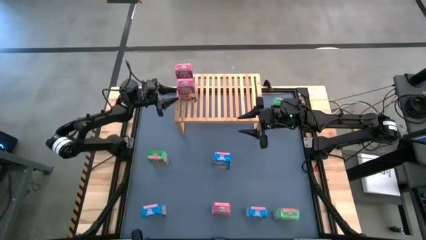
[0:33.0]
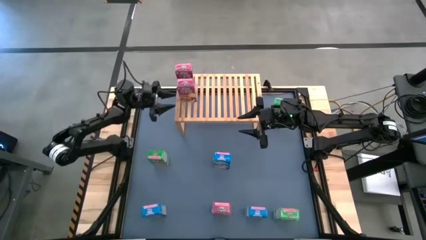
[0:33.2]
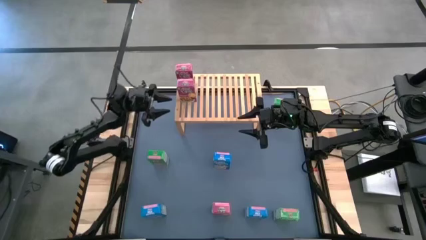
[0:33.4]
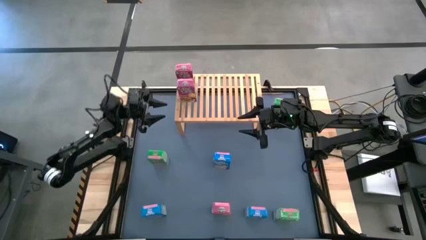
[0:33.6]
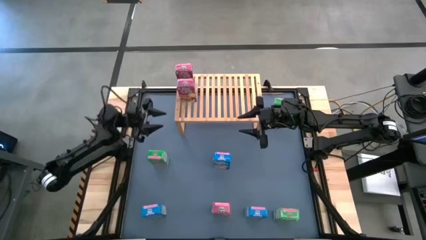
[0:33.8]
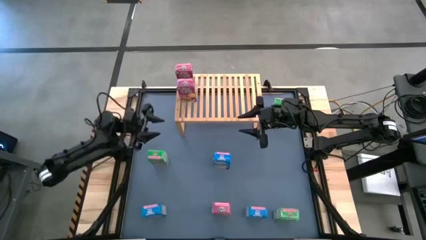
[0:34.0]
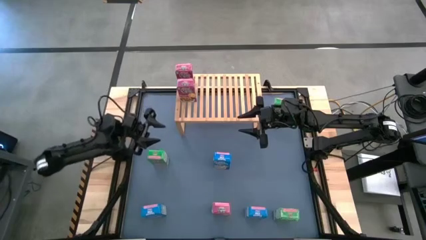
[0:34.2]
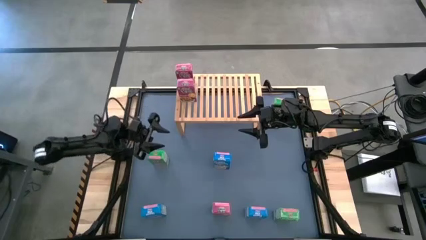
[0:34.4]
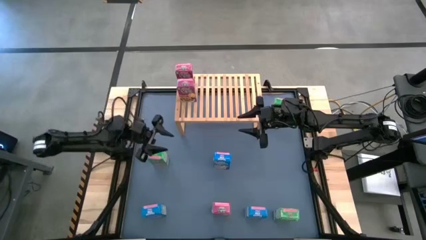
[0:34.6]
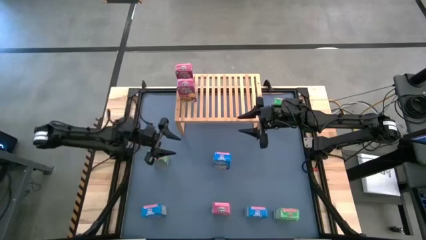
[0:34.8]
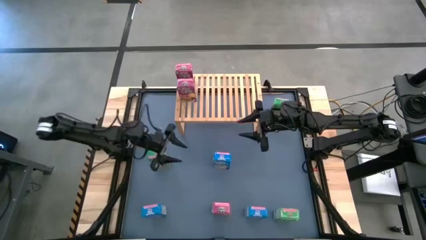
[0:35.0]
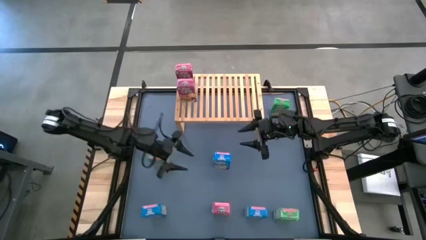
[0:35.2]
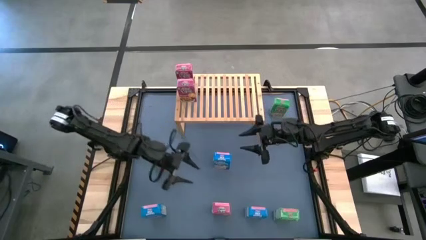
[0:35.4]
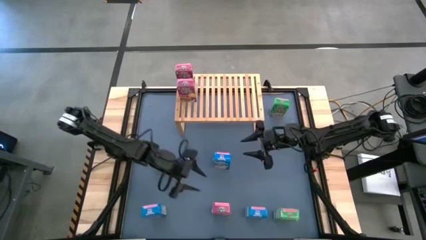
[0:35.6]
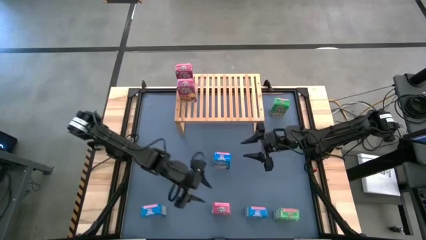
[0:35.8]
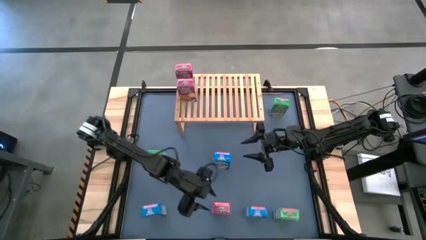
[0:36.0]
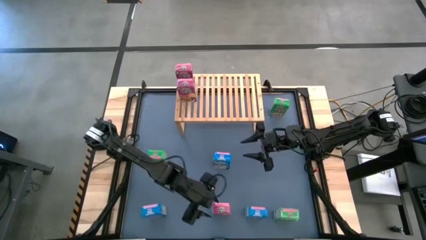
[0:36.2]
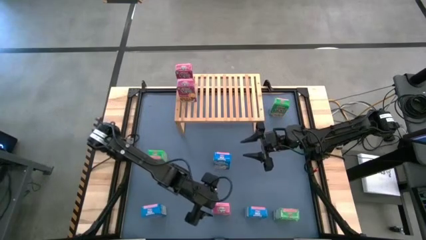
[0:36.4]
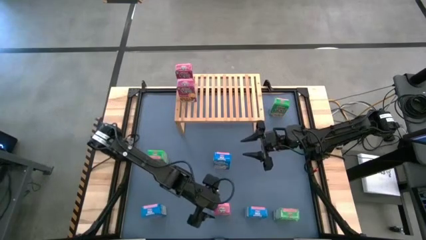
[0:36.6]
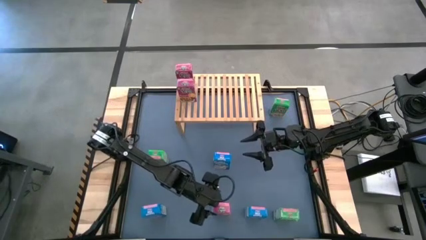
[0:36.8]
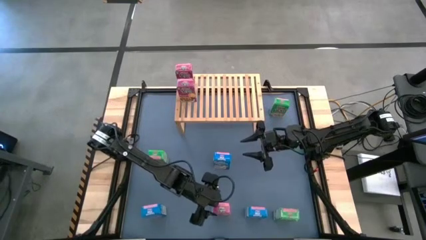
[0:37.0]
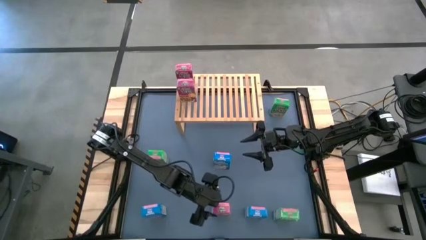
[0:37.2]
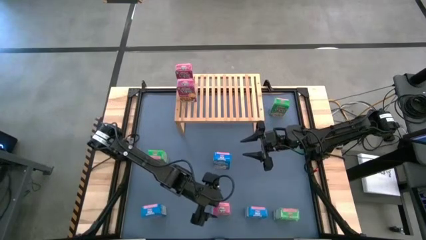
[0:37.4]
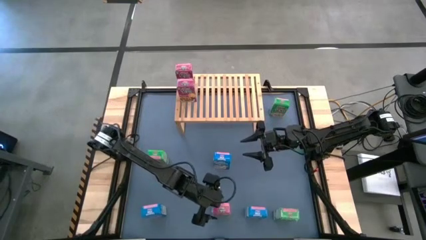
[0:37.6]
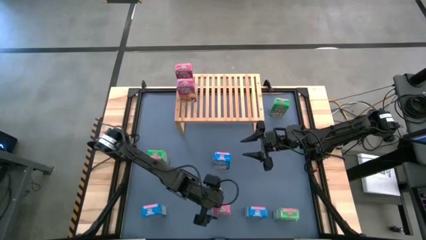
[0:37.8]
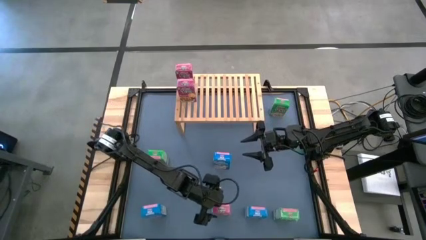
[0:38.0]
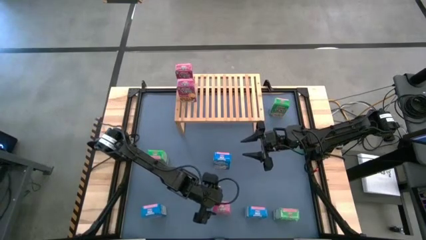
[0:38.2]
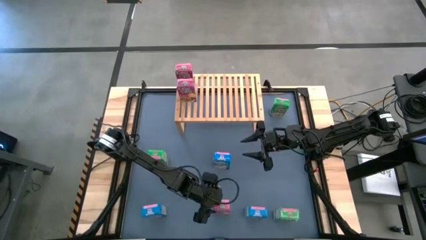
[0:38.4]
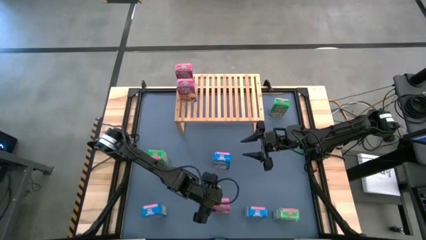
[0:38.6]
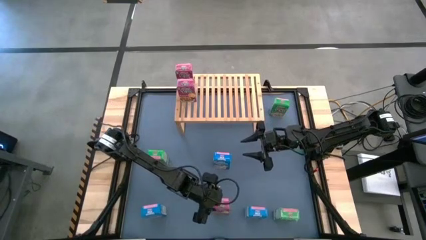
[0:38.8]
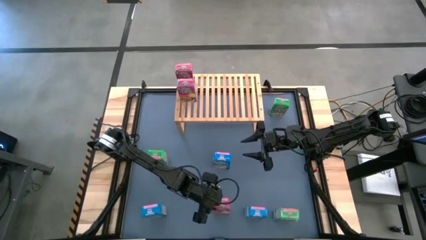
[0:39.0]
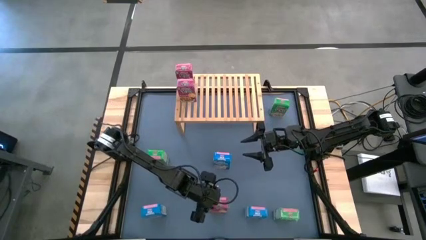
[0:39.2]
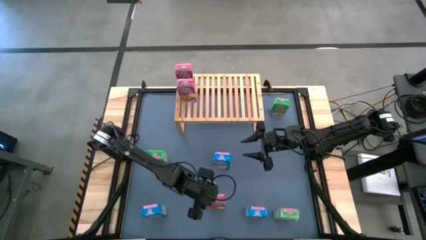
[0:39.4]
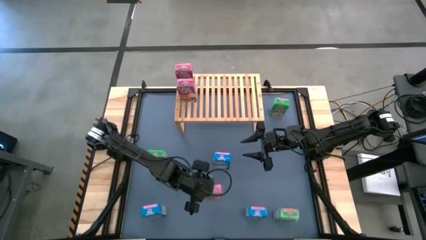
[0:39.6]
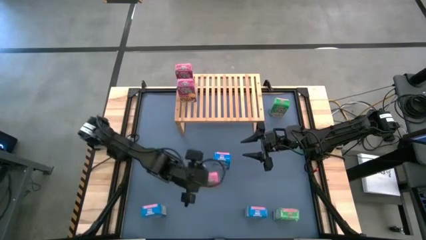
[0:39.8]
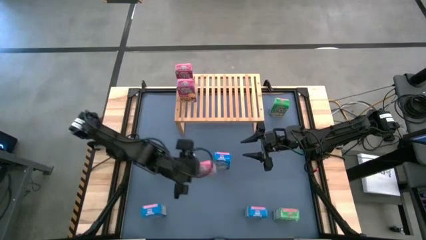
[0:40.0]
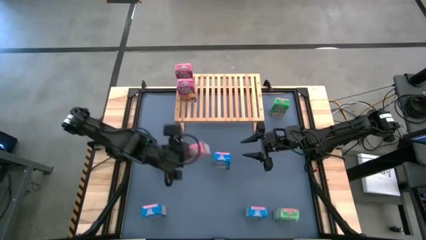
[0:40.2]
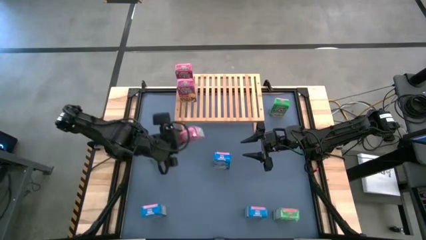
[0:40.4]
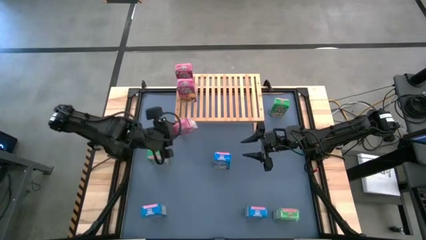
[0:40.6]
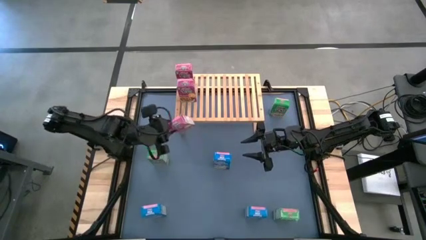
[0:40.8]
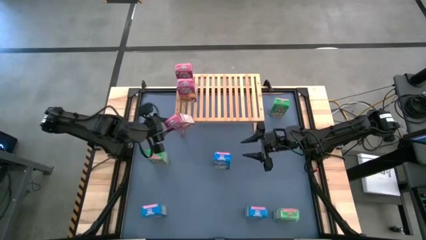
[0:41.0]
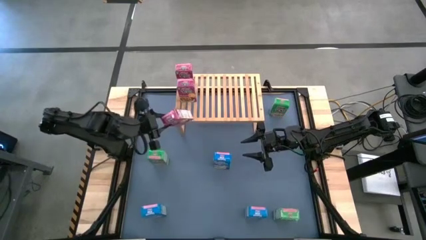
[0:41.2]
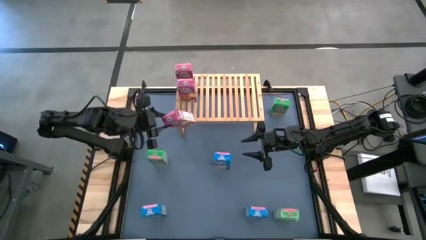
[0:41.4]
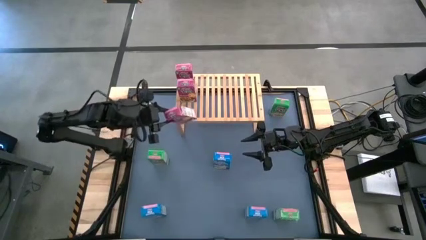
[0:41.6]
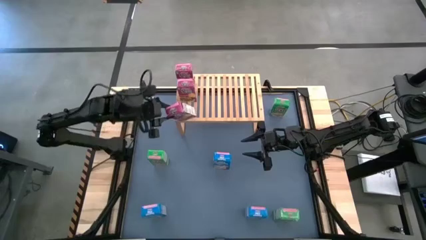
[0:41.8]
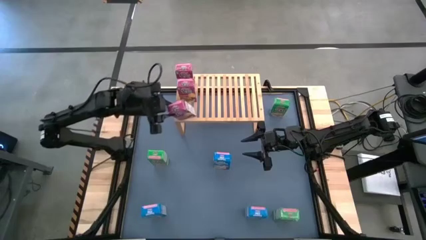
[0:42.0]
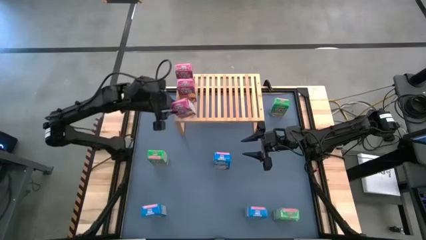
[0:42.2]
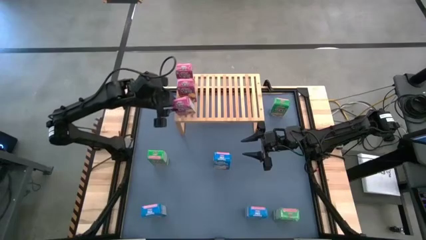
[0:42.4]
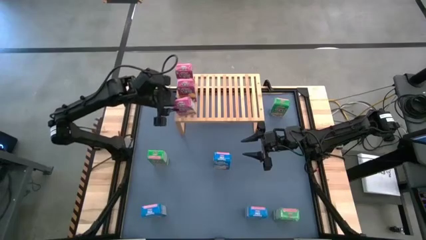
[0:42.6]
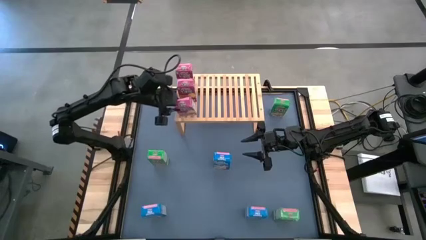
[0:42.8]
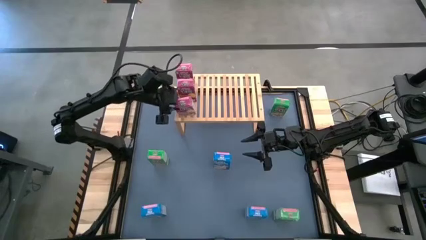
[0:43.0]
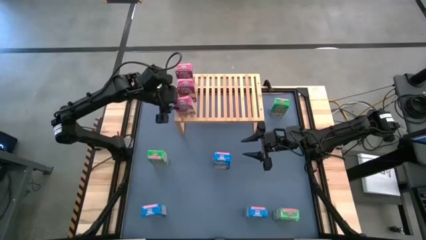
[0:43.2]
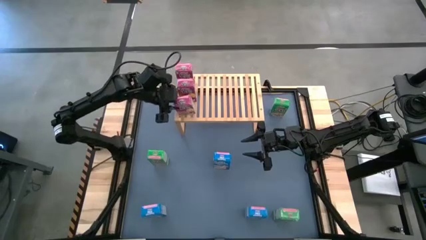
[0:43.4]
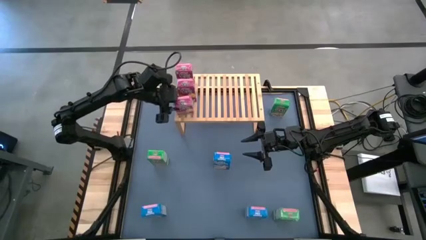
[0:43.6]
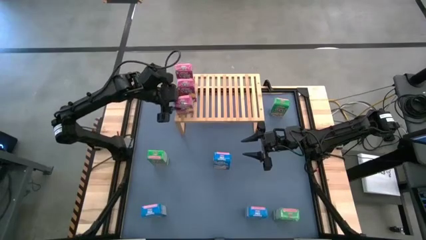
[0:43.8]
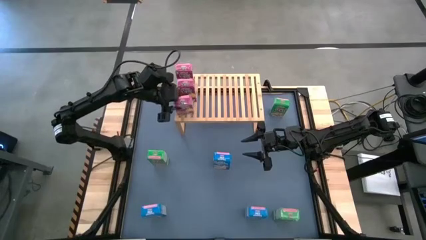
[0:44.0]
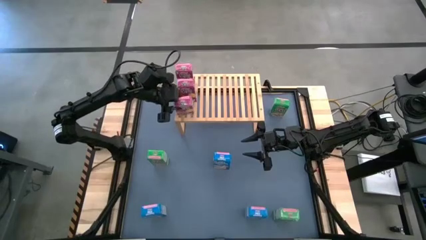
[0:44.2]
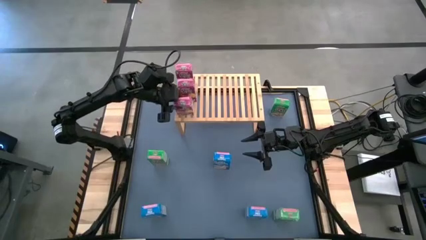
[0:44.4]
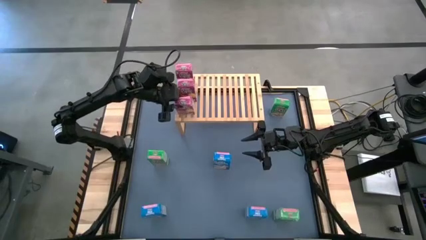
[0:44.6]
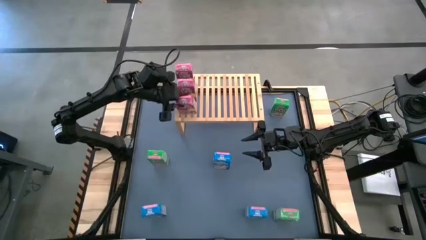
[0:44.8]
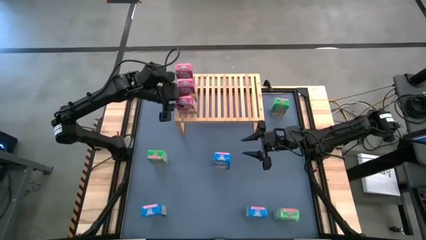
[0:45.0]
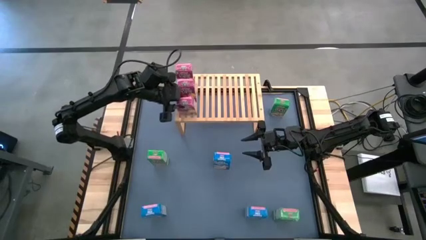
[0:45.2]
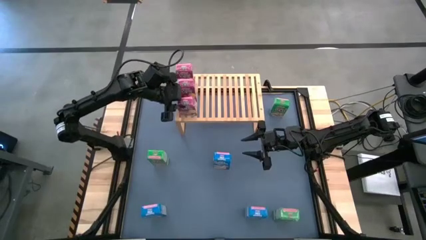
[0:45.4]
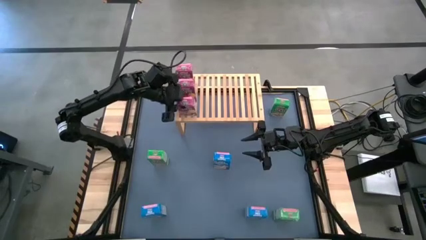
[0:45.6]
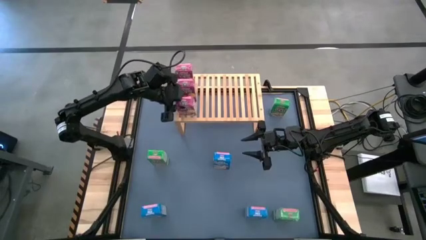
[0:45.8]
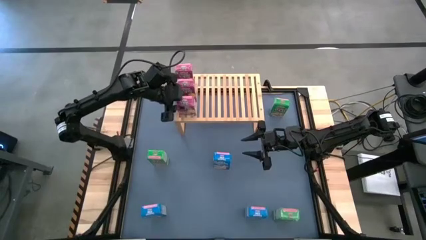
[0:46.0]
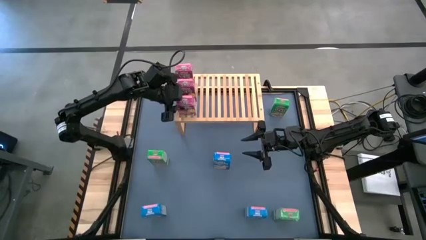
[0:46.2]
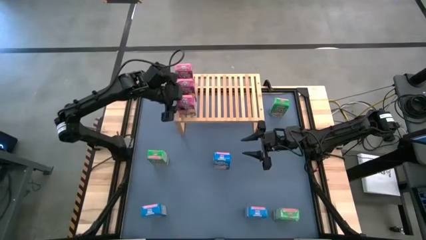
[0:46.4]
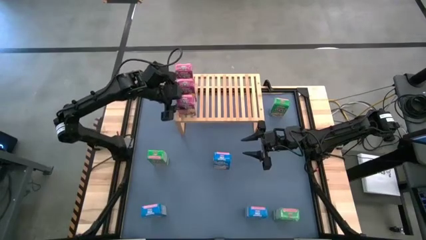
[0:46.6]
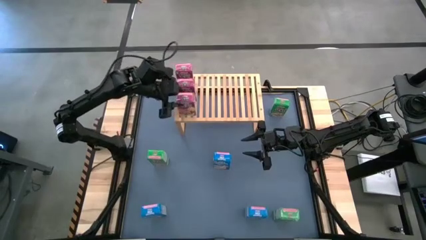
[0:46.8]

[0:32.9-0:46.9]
Task: Stack cereal on shelf
Put the purple cereal box on the shelf aligned with the other purple cereal boxes

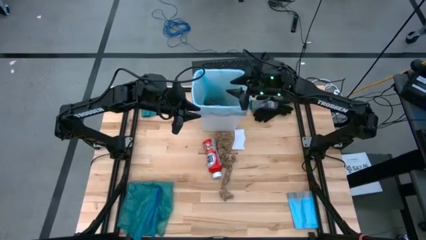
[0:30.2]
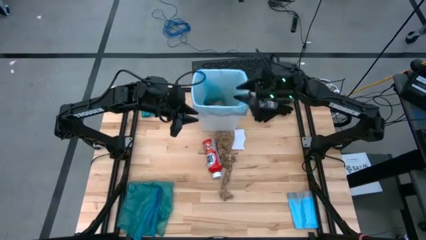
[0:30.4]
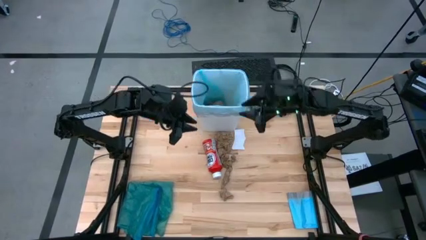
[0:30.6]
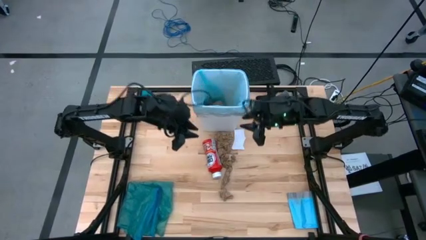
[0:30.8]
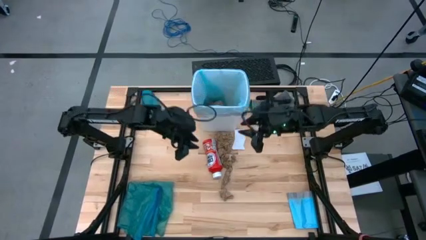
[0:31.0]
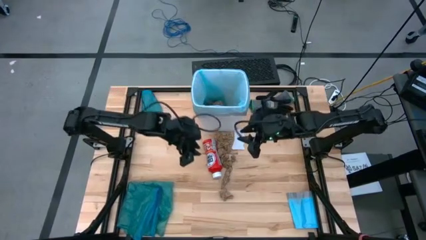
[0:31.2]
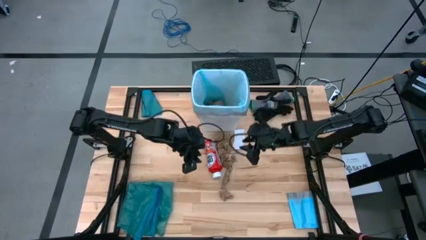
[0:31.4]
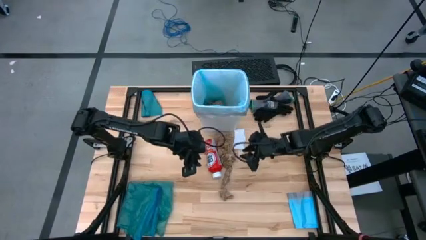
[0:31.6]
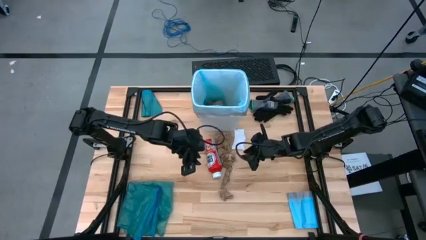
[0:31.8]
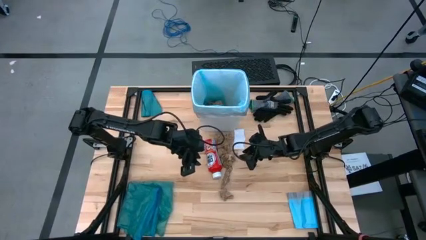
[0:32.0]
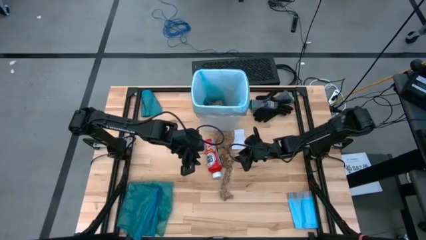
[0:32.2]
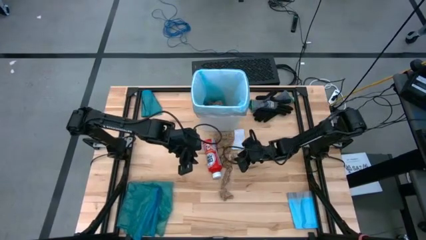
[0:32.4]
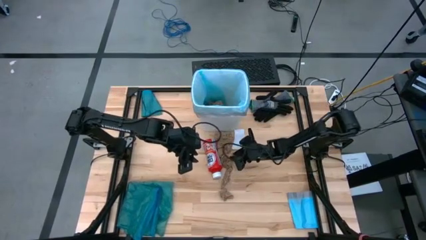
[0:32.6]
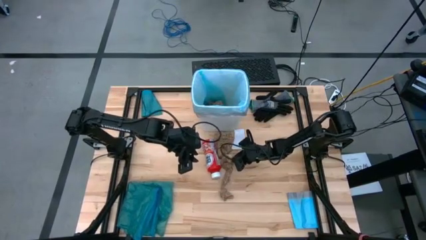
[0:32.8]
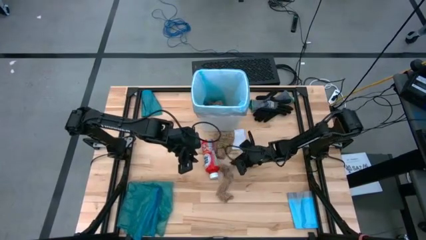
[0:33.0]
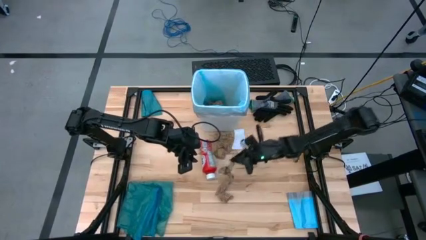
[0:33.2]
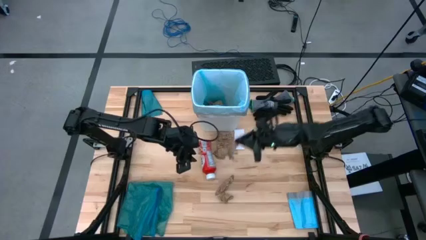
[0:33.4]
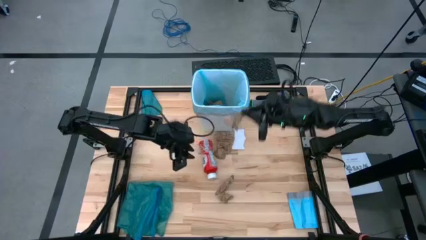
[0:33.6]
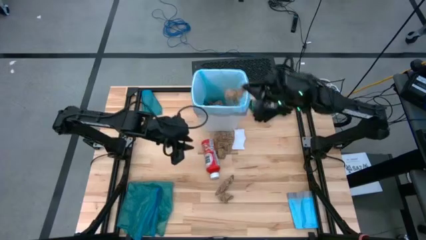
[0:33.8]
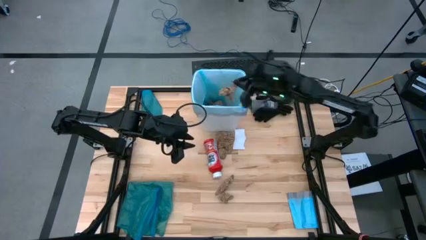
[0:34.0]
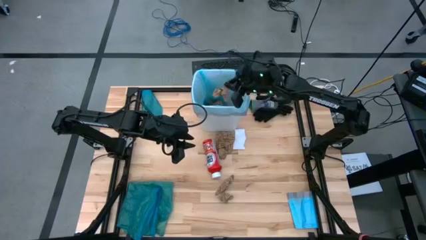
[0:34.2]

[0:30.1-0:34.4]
Task: place trash/remove bag and relplace
Put the brown paper into the white trash bin
